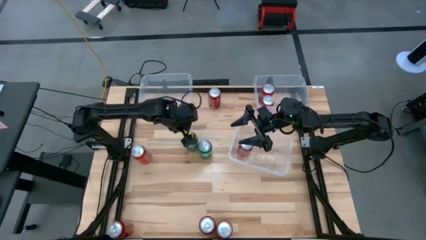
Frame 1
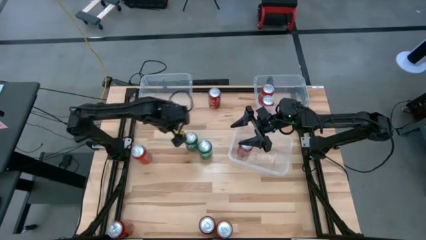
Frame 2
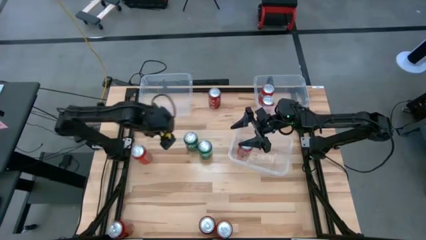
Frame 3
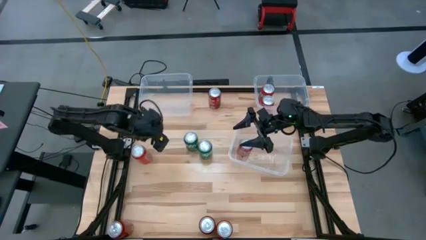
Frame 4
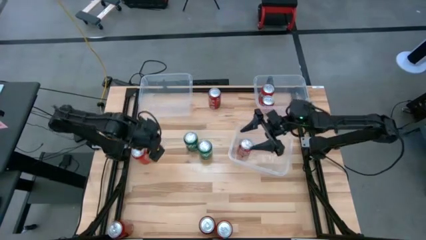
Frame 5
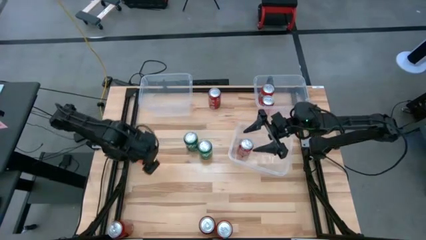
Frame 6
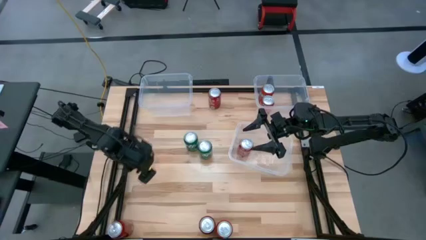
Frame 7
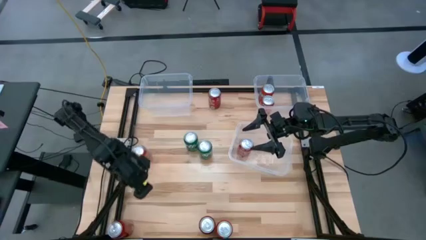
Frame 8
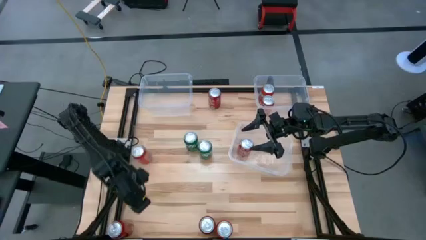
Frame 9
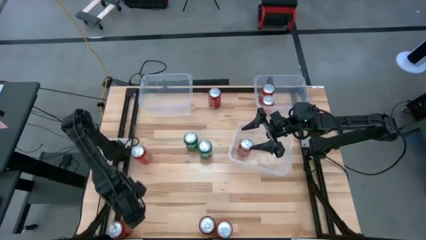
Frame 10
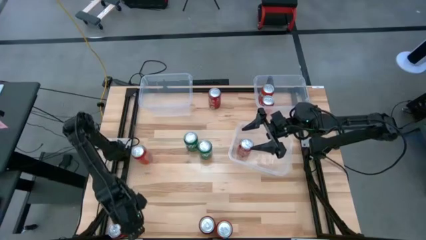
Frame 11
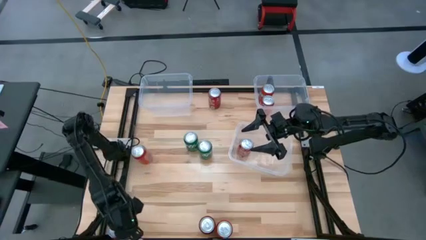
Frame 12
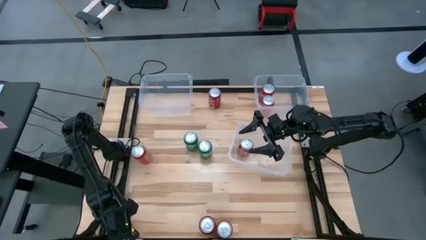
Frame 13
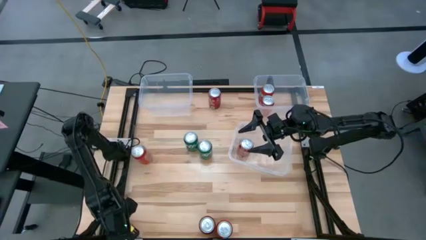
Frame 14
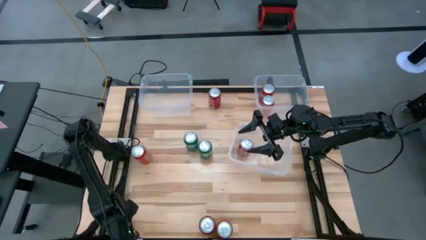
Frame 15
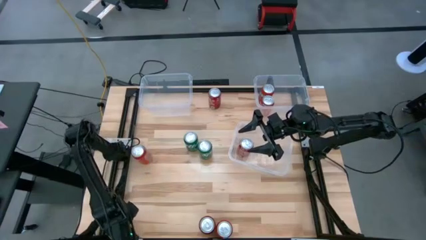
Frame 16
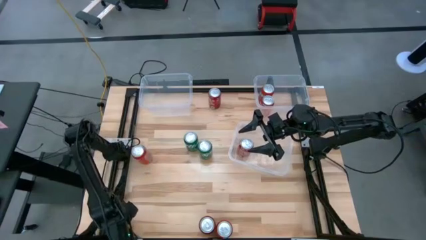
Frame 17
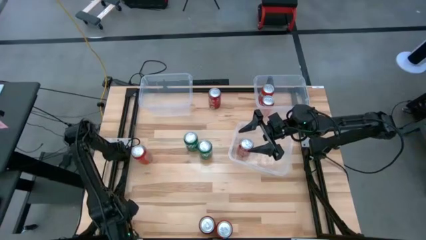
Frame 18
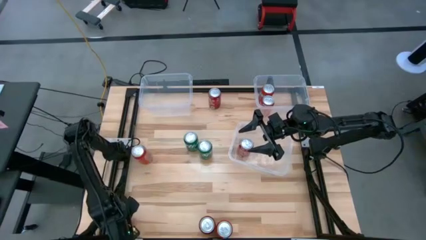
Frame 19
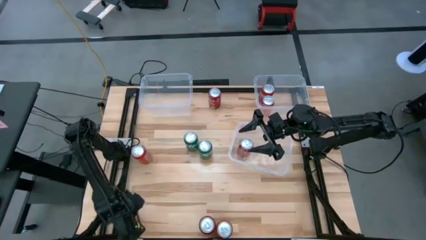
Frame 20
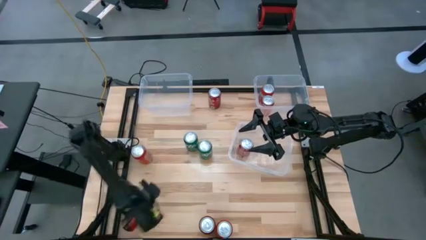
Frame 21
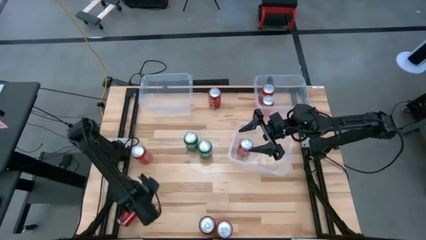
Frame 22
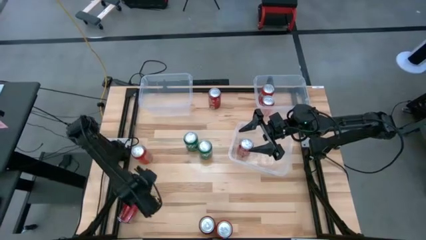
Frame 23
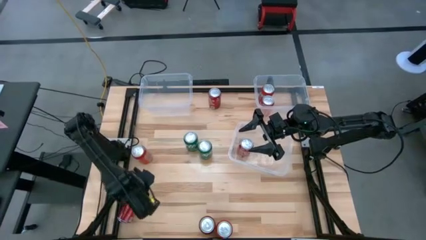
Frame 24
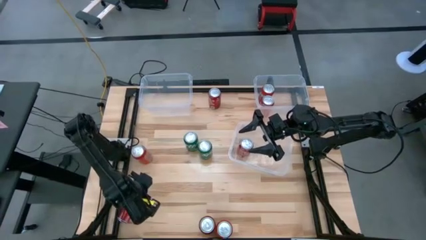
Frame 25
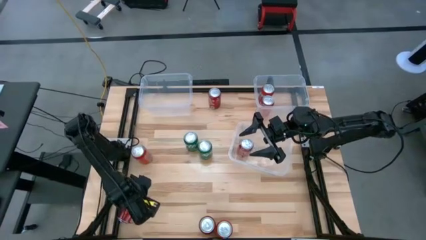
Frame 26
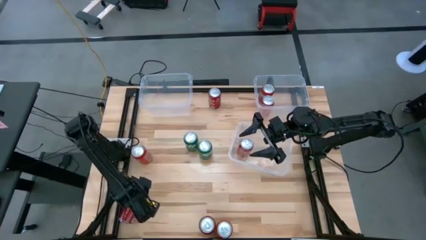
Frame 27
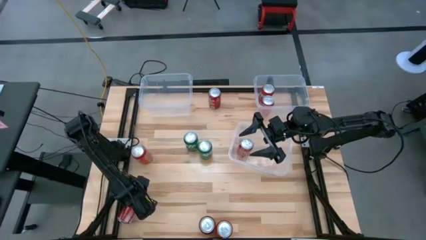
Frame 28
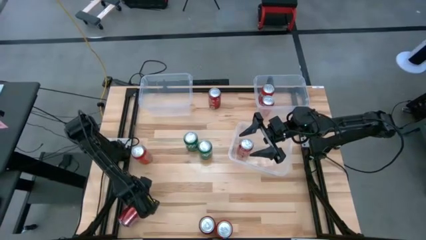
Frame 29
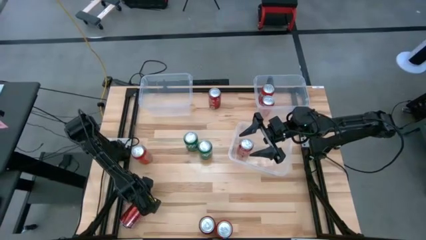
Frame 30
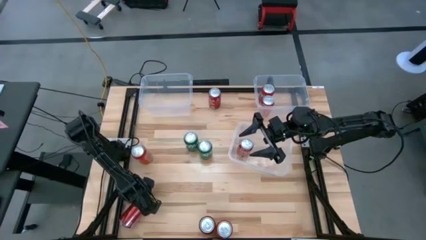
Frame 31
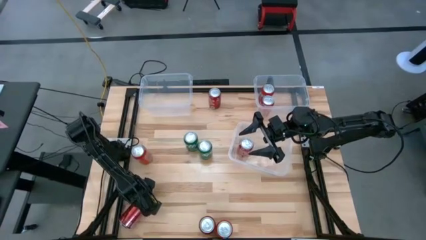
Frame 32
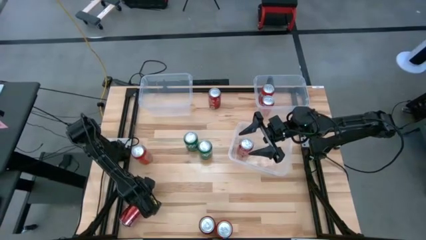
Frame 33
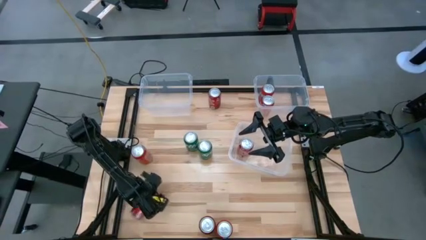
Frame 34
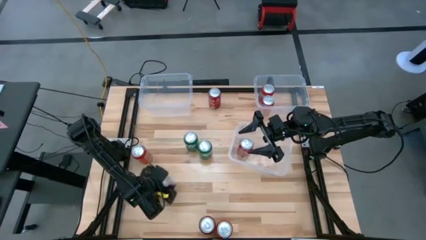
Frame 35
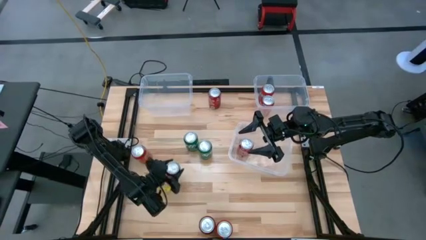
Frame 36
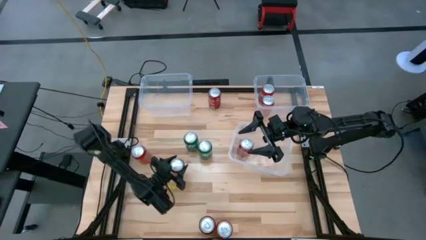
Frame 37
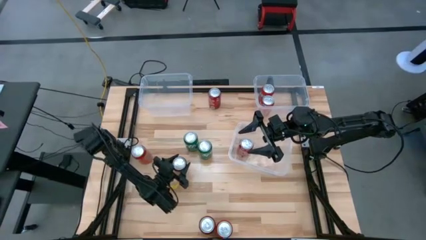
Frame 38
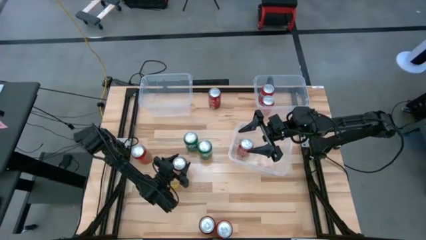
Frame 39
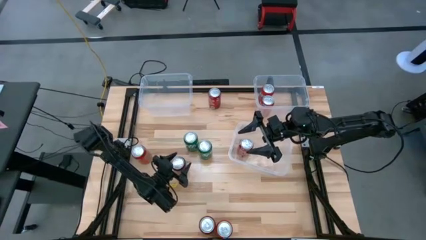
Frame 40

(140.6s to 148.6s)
Task: Sort soda cans
Move the bottom left red-black soda can to the middle of the table

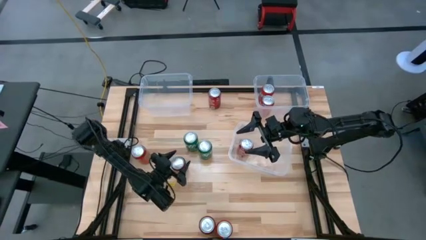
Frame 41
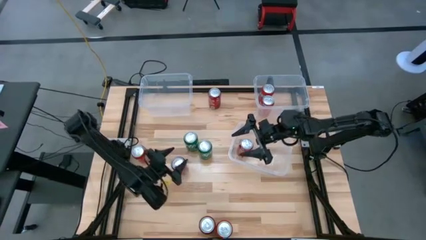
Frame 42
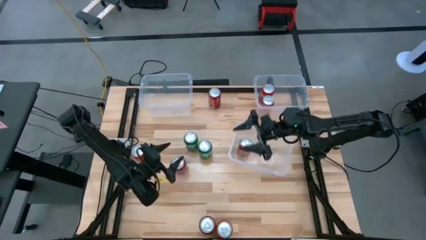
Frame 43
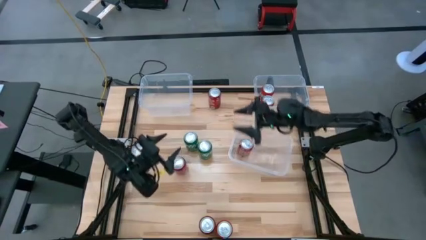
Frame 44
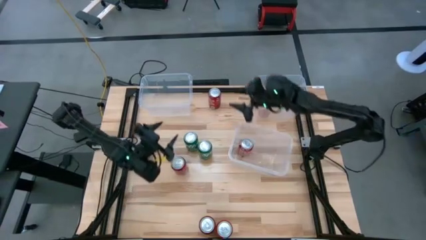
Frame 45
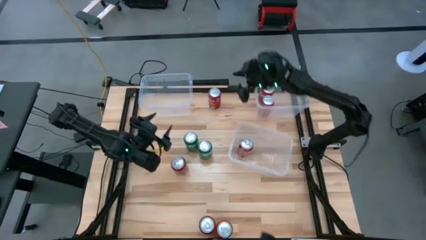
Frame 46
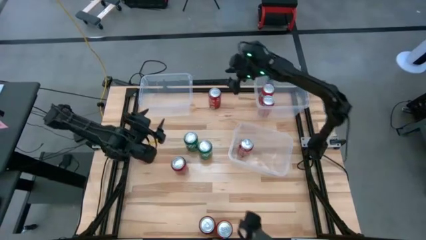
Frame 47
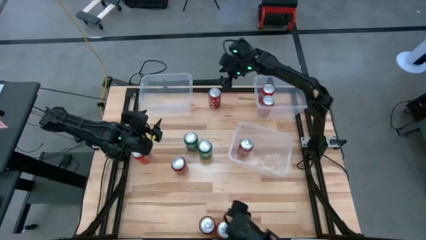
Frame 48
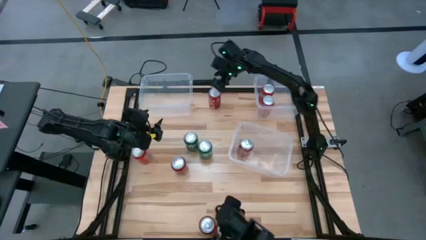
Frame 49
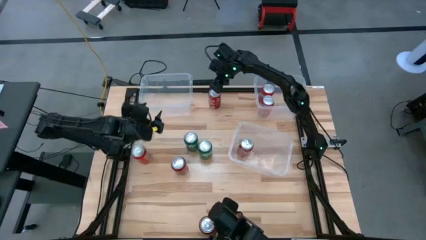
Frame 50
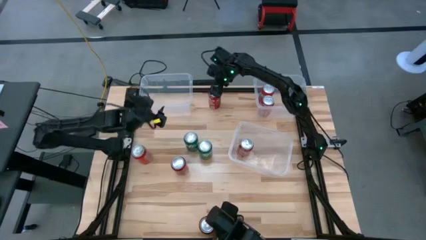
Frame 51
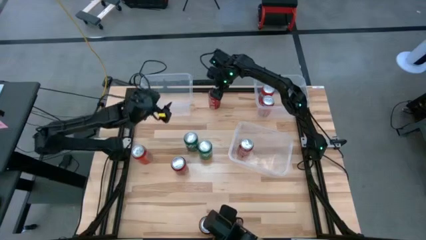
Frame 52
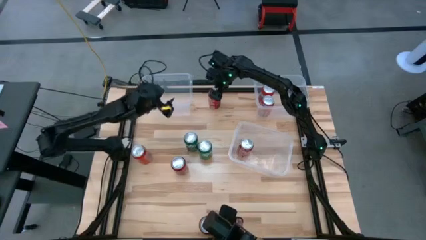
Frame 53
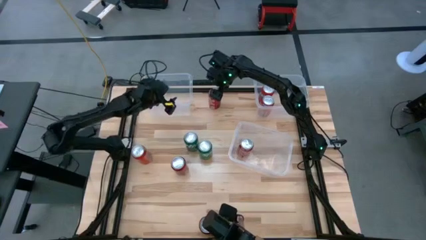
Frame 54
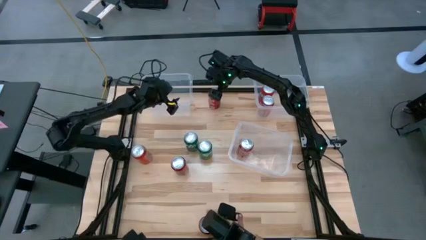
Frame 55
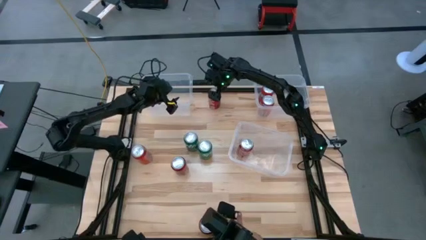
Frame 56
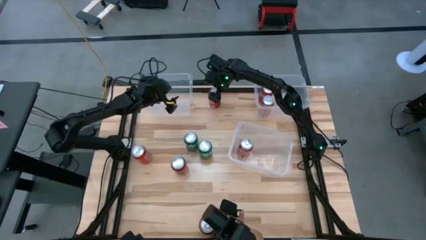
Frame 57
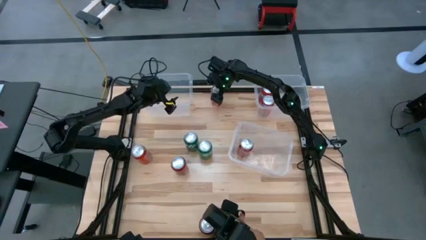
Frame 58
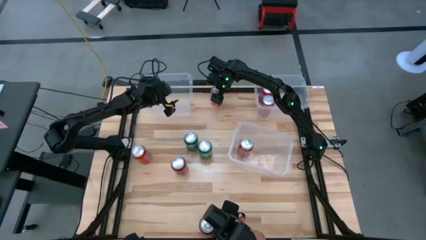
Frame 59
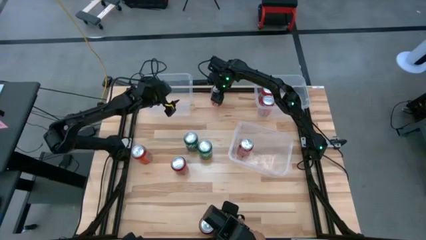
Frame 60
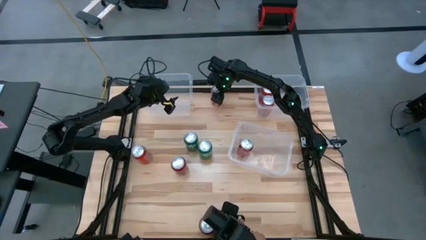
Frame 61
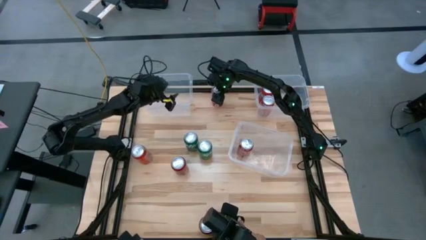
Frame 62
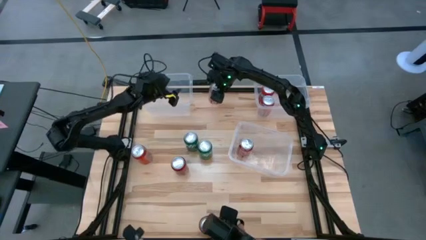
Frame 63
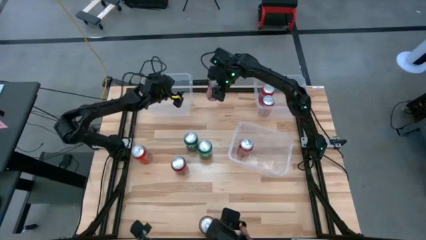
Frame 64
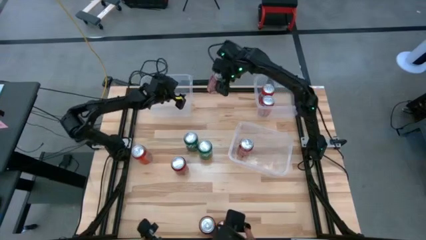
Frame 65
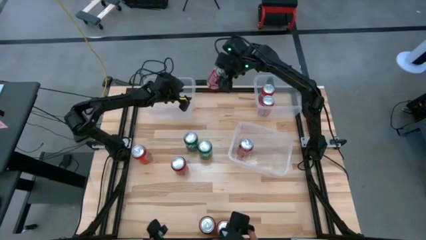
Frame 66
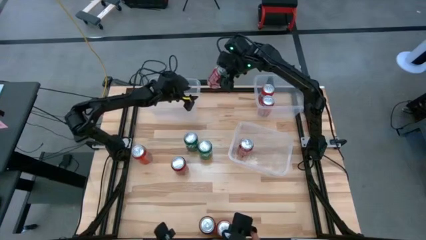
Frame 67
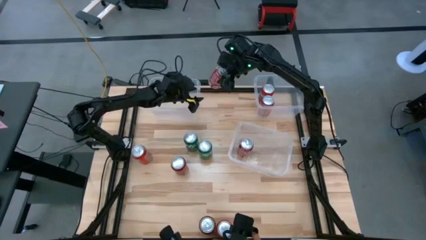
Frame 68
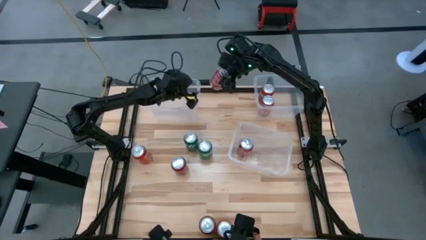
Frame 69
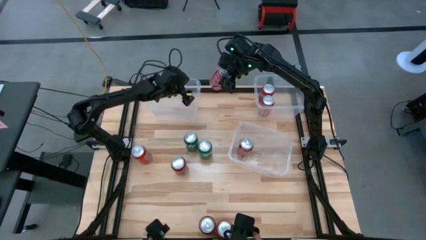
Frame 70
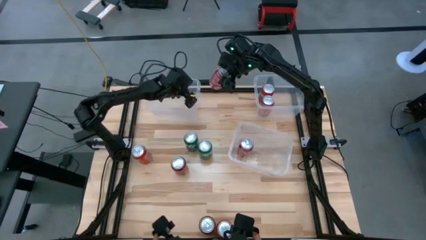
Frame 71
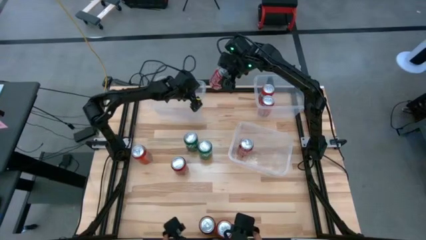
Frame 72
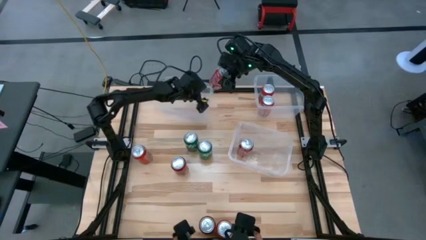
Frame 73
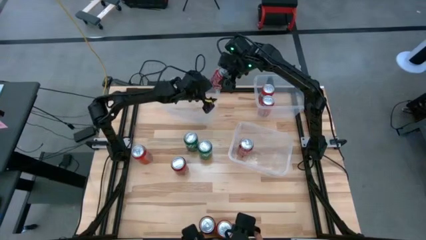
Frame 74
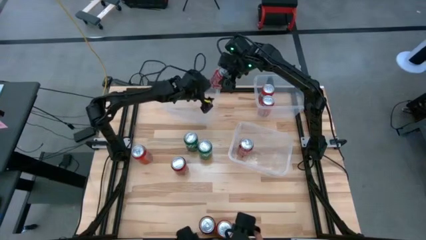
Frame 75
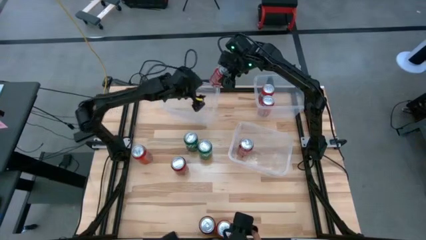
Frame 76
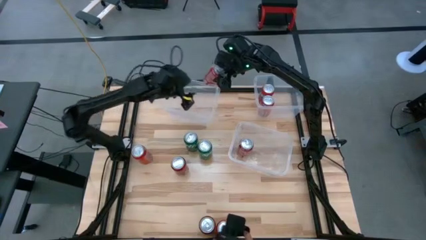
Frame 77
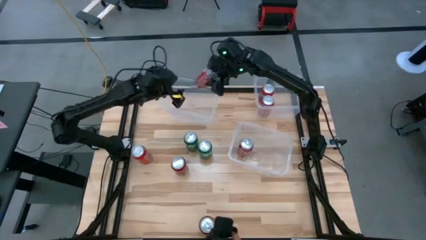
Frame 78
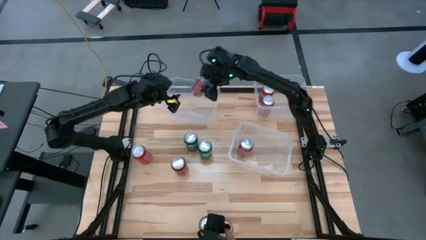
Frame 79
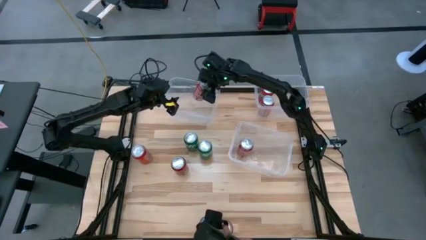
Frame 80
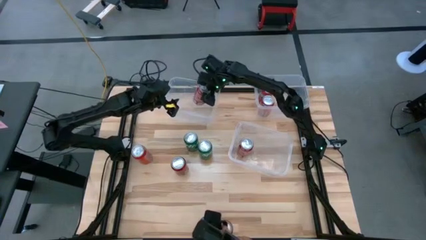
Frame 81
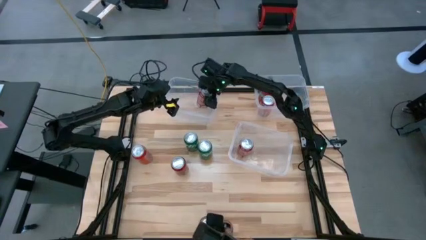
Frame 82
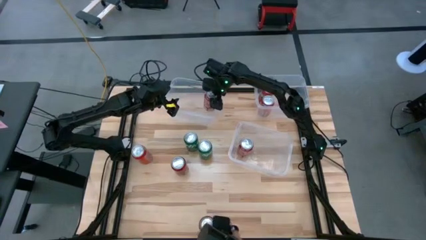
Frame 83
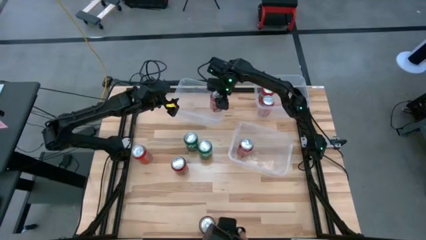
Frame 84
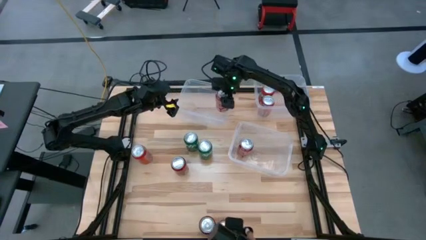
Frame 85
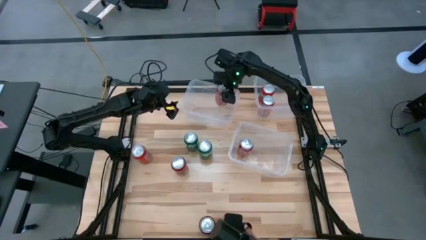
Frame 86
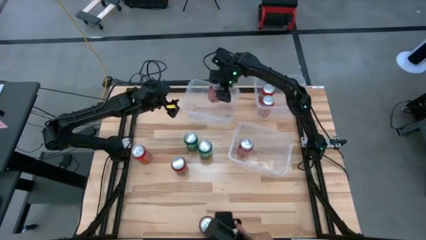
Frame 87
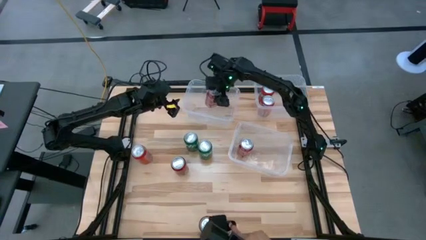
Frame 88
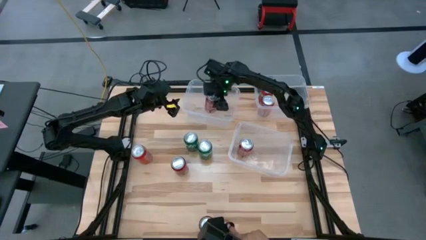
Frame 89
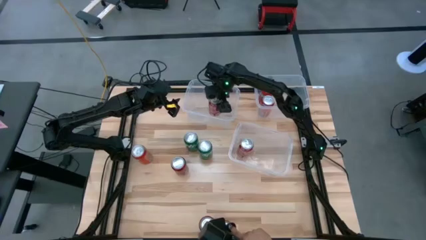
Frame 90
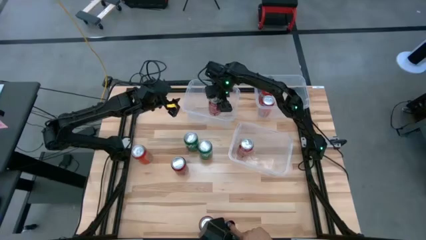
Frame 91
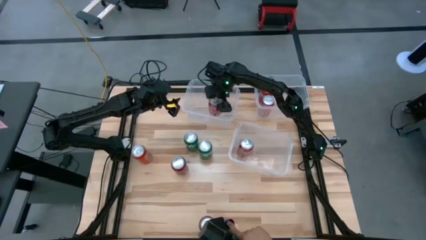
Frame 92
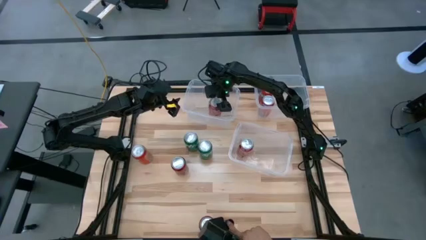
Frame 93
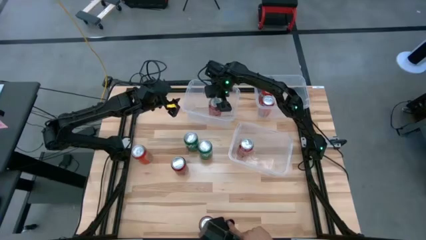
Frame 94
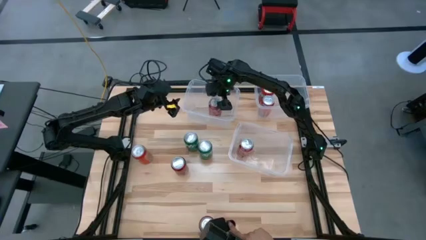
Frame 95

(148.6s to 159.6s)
Put the top red-white soda can into the bottom transparent bin
